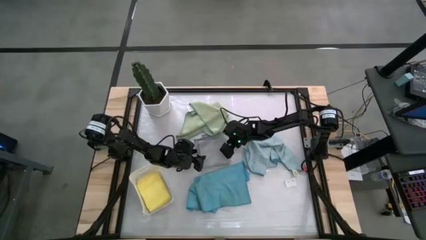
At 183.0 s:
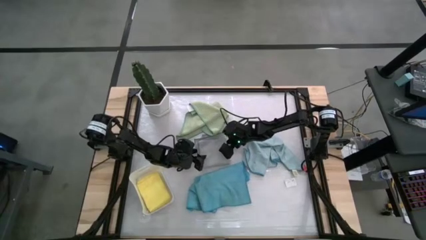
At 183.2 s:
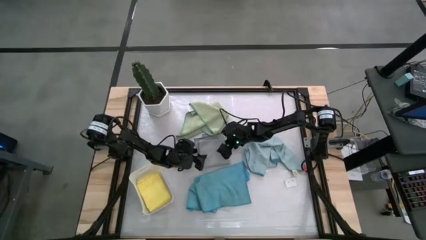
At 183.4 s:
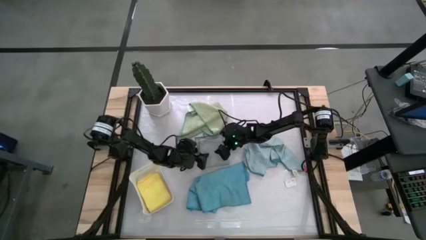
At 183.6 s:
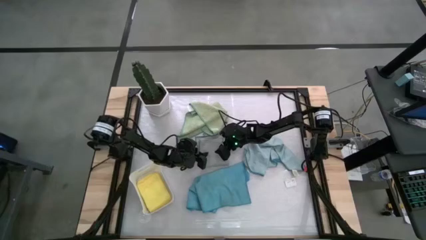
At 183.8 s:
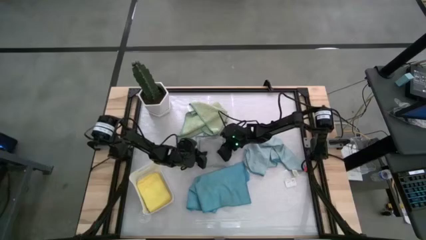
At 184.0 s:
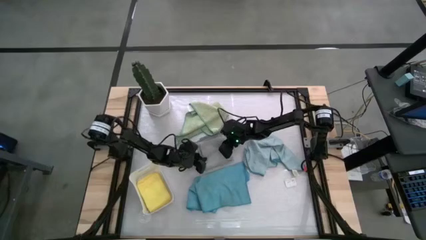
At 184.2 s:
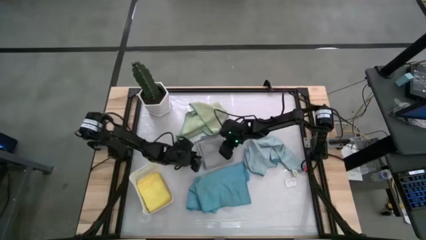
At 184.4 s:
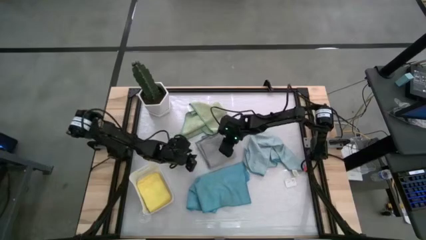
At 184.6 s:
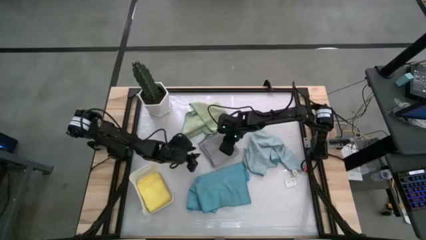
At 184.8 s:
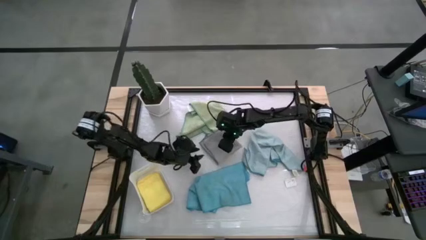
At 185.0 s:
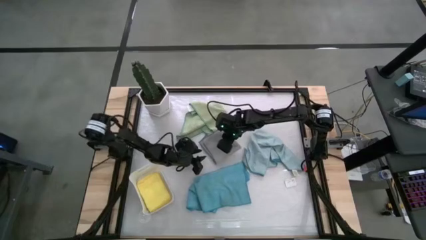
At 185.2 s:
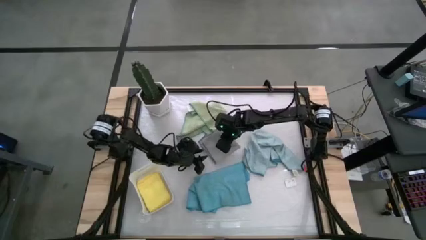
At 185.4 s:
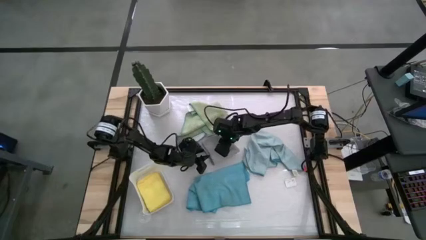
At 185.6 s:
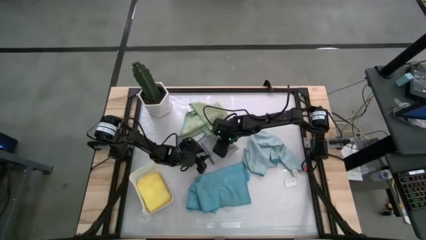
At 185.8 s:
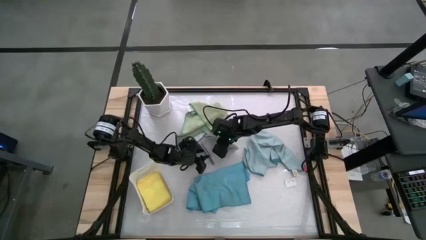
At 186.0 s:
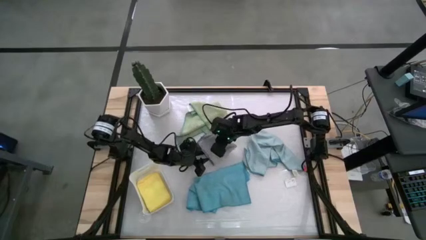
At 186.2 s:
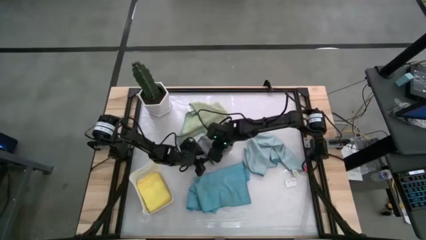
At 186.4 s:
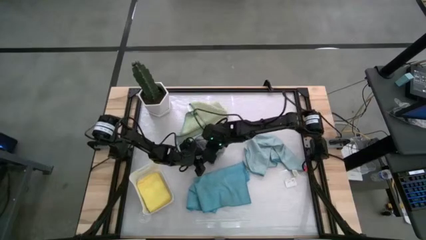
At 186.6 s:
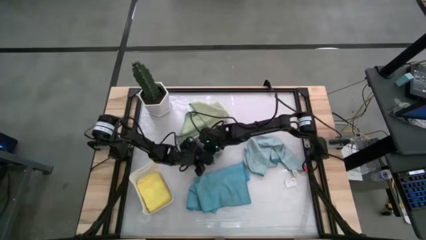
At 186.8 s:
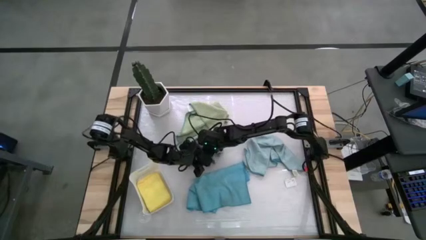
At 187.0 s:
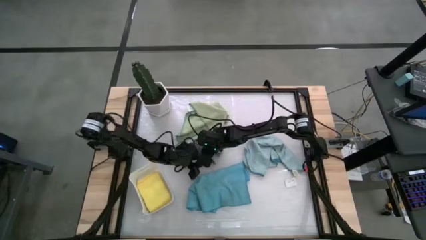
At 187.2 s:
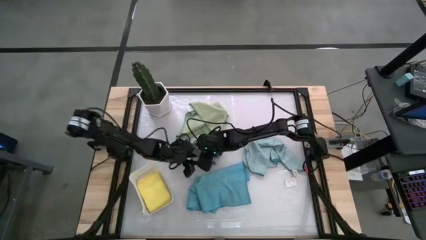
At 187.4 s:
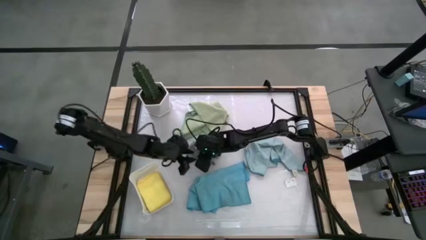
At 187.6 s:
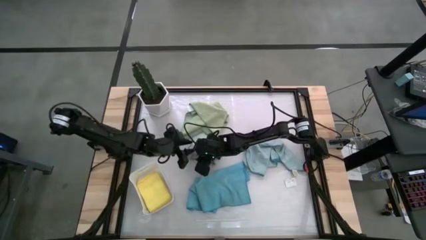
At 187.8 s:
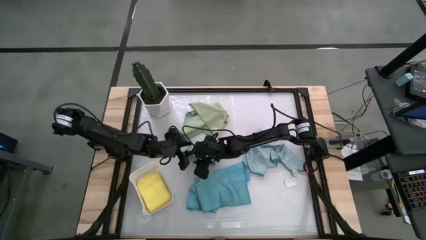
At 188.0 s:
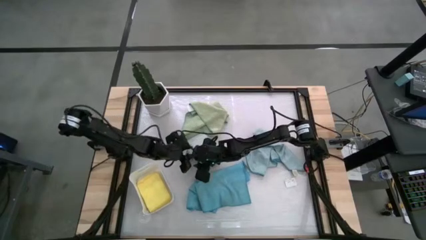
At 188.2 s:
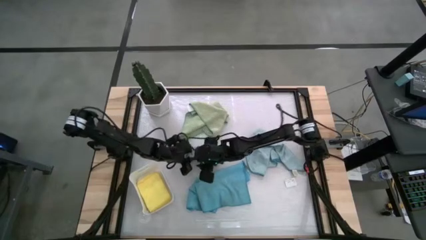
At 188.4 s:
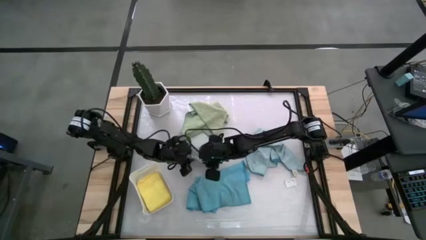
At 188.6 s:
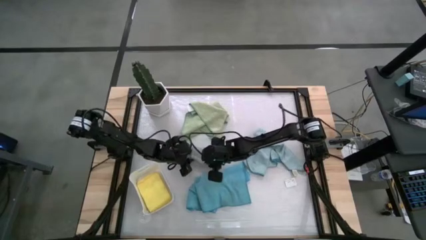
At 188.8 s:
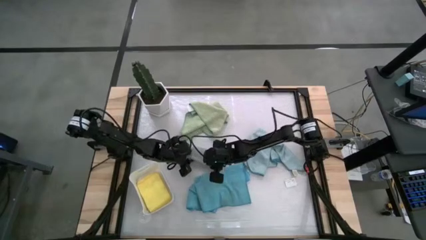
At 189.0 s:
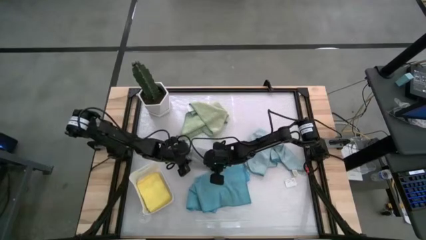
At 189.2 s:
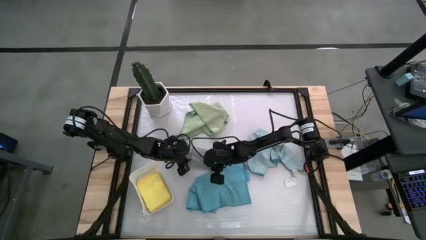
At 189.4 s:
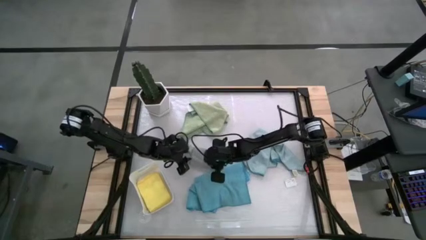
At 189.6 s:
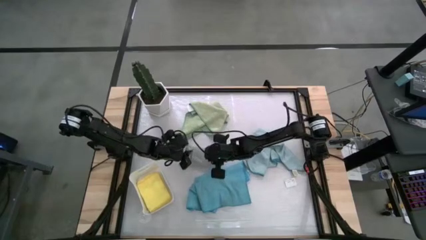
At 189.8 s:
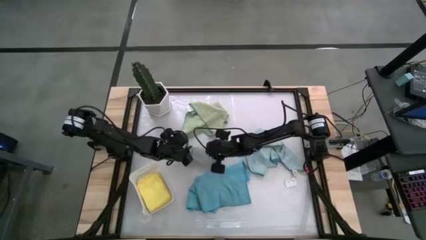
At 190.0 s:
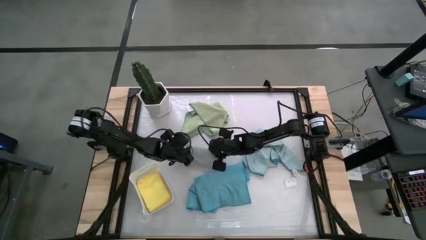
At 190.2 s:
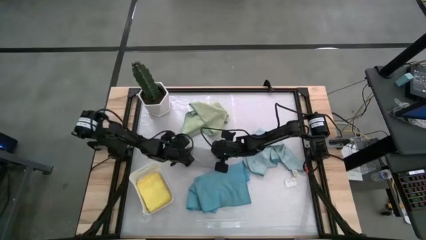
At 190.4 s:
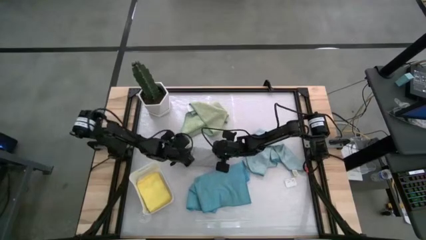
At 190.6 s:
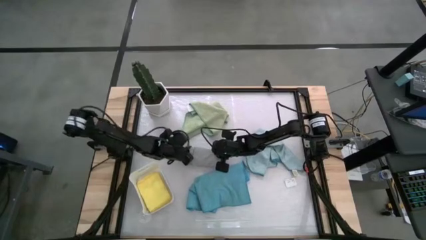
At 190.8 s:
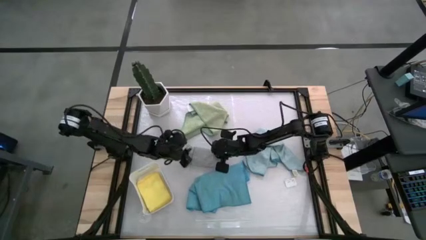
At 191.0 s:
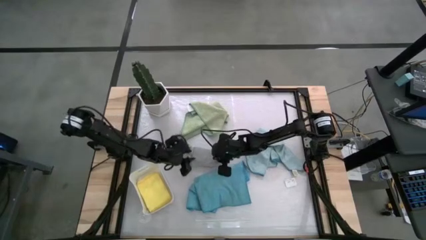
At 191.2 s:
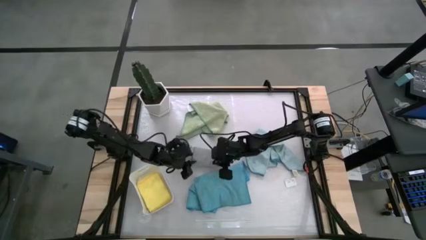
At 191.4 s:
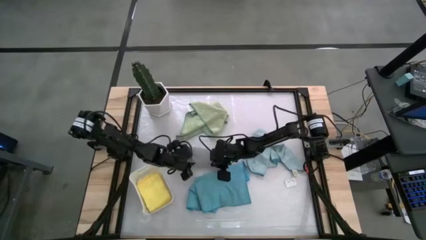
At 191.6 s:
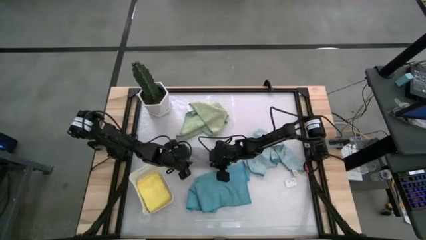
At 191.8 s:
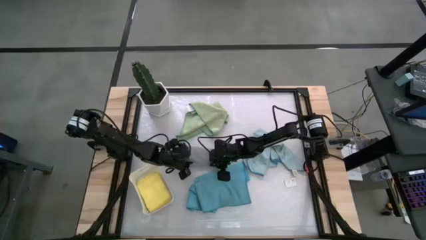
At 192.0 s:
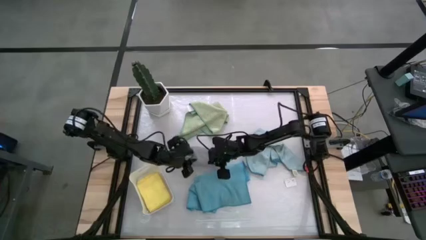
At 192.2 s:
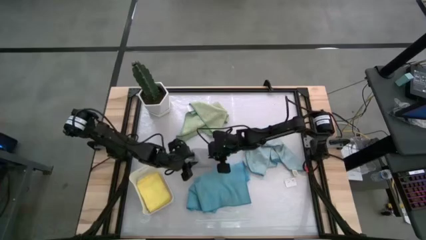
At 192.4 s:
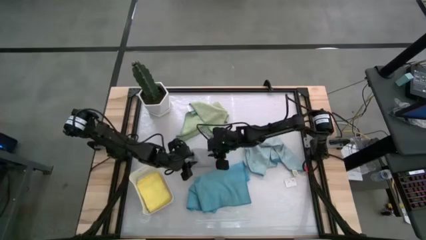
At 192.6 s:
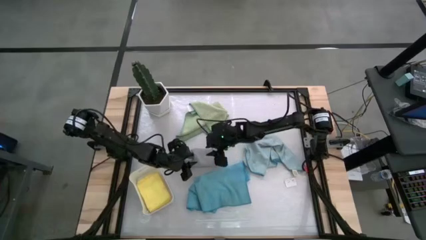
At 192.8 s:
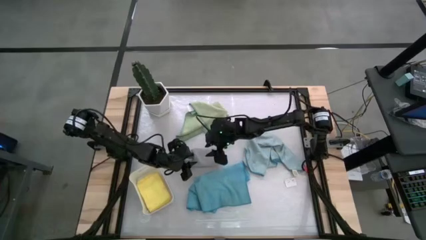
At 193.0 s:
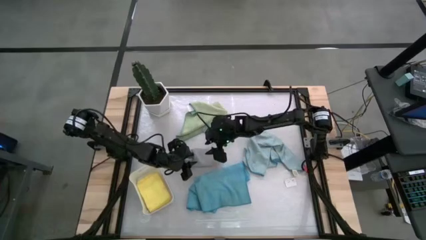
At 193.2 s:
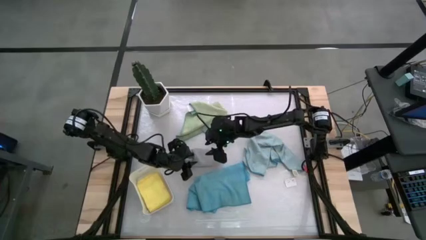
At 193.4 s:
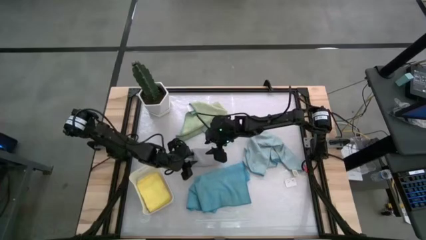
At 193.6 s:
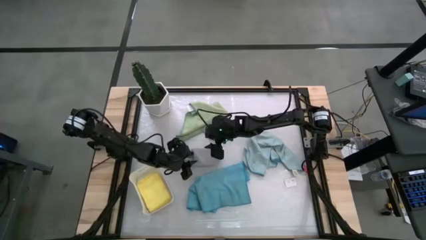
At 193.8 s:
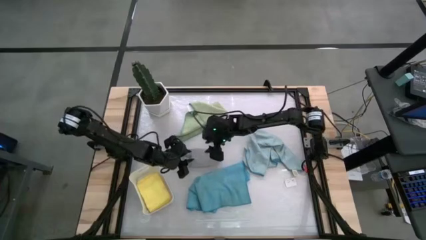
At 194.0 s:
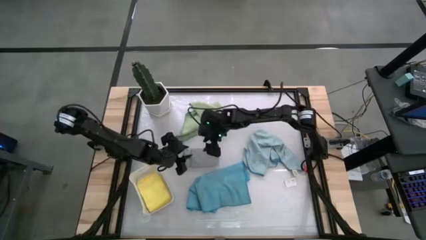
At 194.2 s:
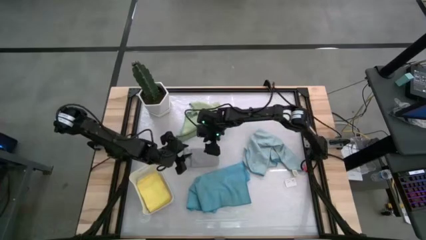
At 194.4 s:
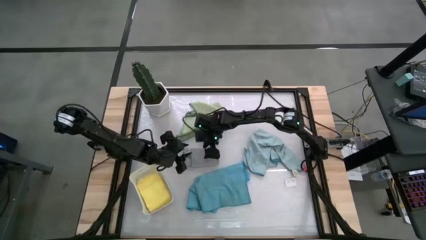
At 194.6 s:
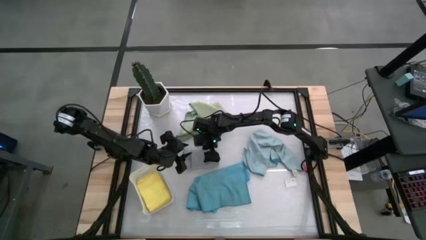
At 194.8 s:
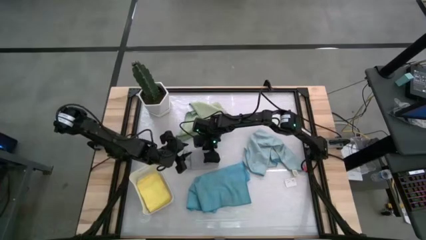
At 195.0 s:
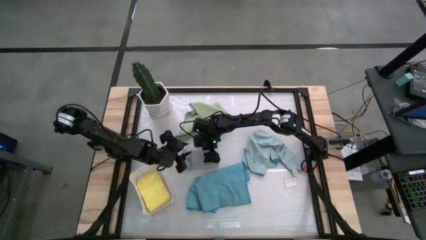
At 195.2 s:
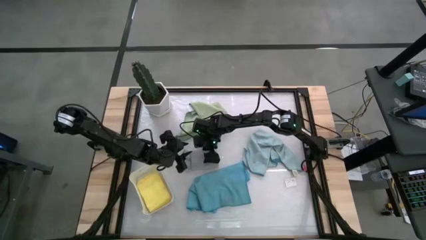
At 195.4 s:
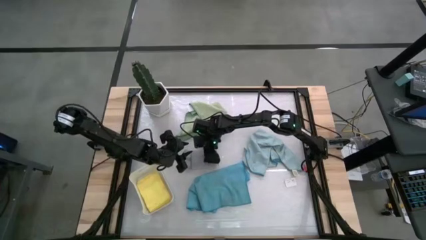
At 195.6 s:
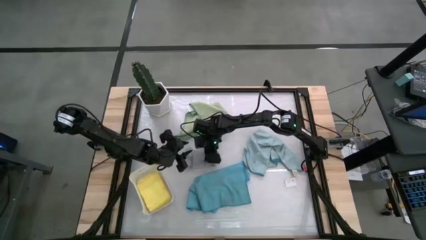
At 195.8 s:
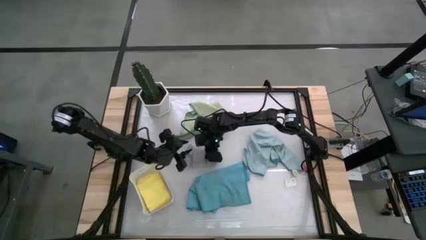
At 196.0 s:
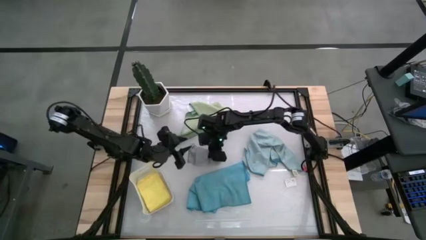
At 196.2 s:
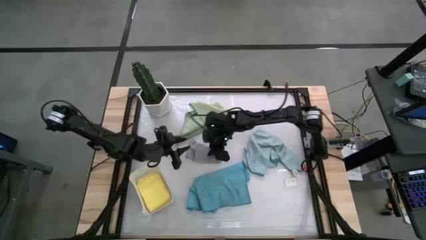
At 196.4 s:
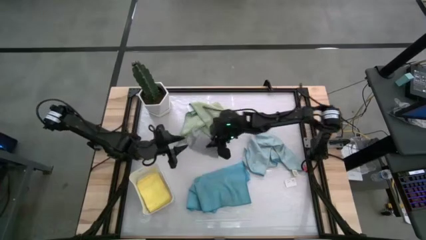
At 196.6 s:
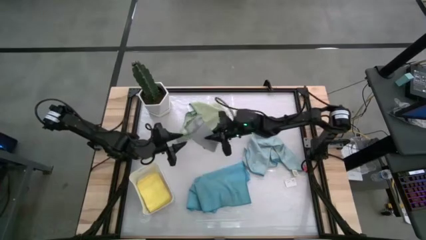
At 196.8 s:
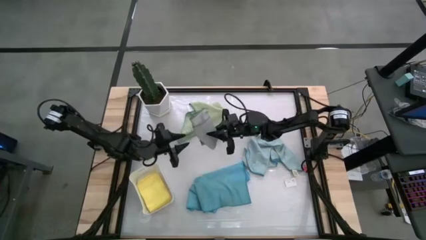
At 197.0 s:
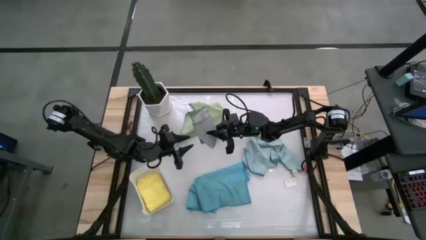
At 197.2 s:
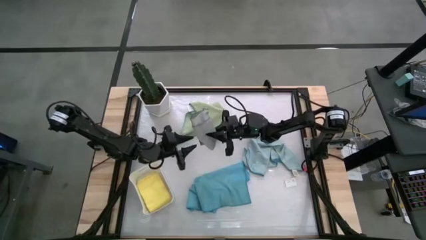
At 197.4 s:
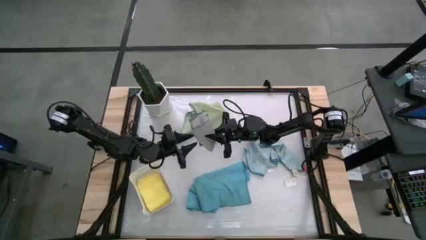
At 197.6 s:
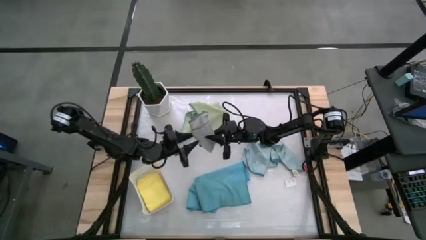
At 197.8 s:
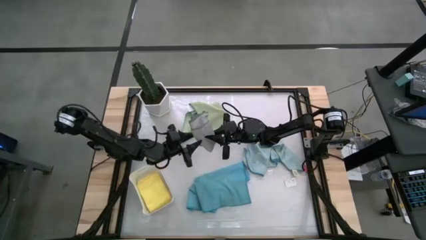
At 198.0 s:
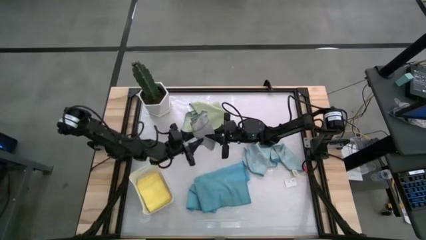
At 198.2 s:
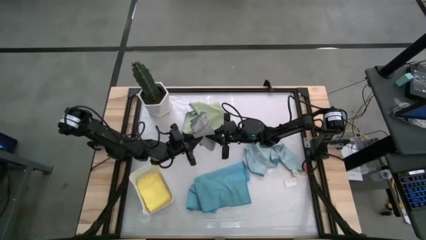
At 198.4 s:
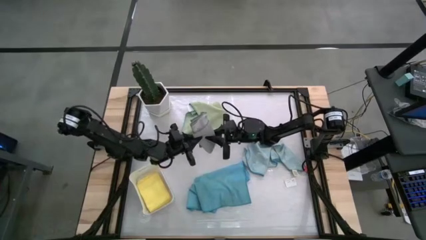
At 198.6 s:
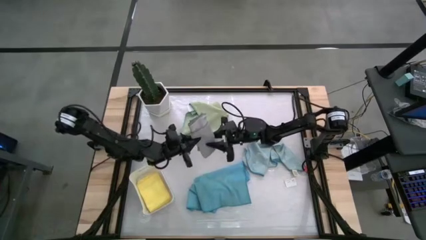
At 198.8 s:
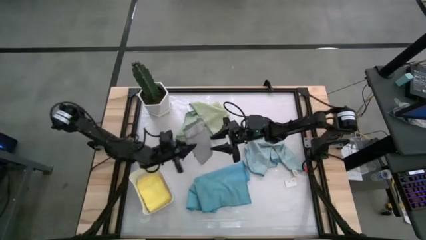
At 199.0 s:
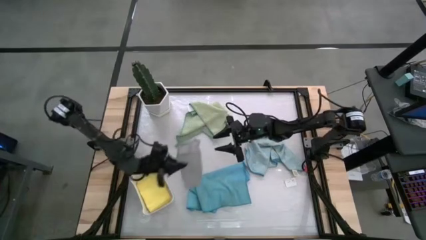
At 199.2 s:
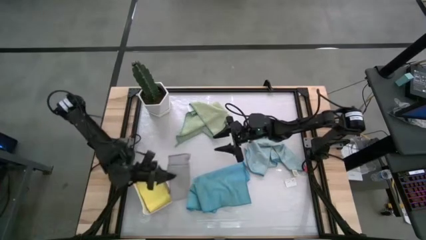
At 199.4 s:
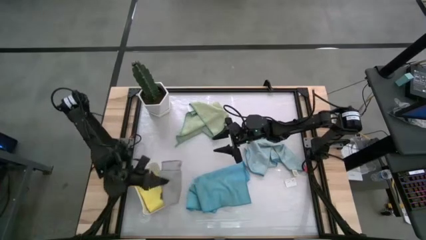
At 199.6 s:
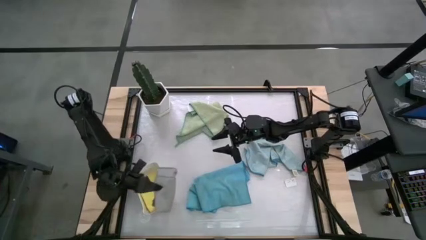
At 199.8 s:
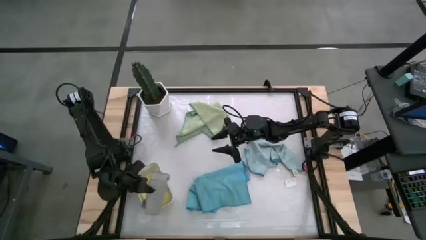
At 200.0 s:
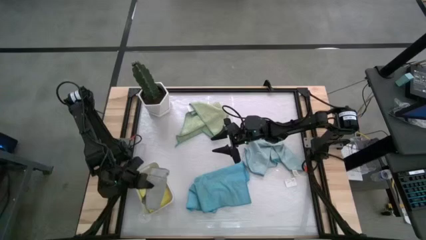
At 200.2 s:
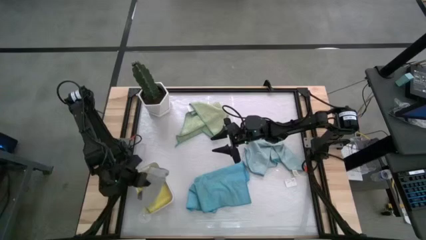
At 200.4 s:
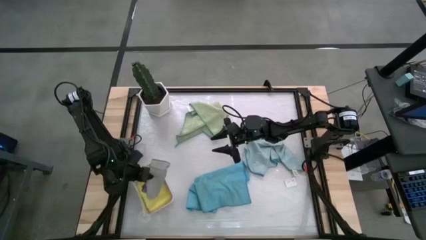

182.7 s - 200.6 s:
Task: Fold microfiber towels
Fold the gray microfiber towel
